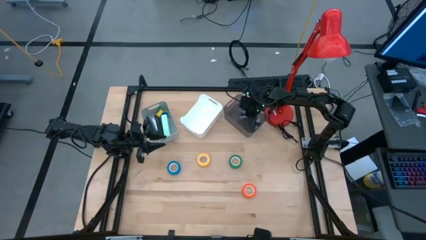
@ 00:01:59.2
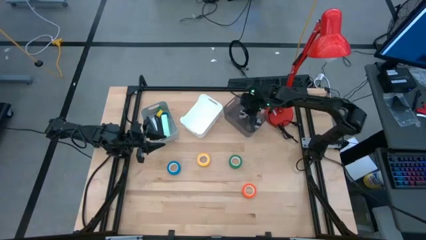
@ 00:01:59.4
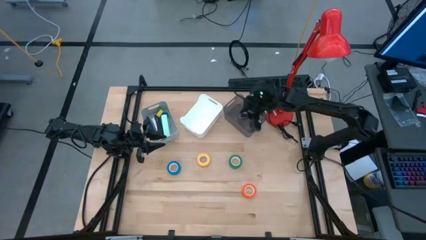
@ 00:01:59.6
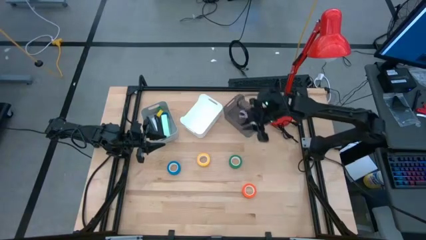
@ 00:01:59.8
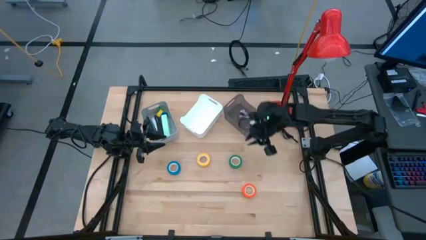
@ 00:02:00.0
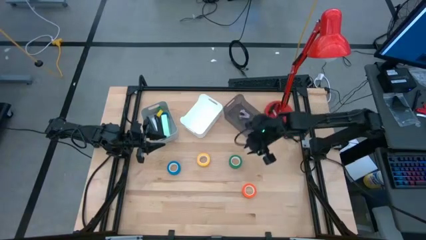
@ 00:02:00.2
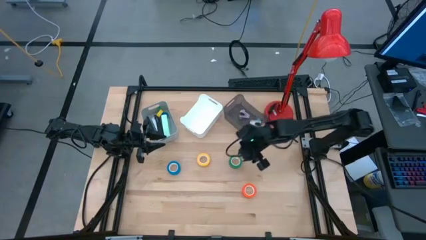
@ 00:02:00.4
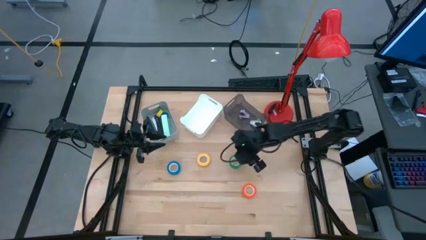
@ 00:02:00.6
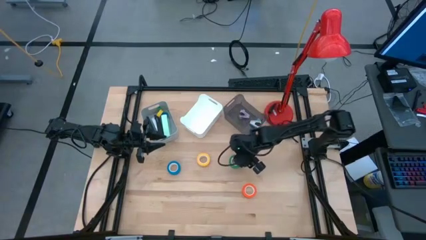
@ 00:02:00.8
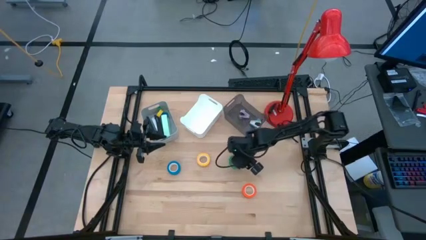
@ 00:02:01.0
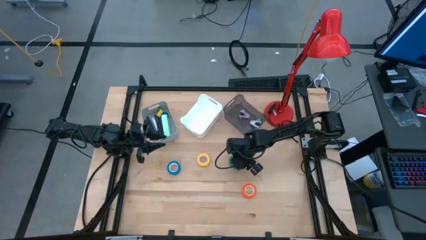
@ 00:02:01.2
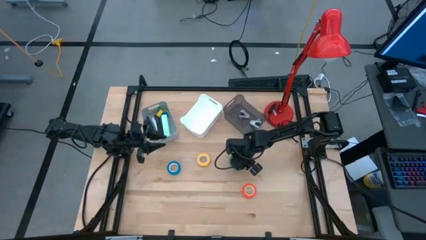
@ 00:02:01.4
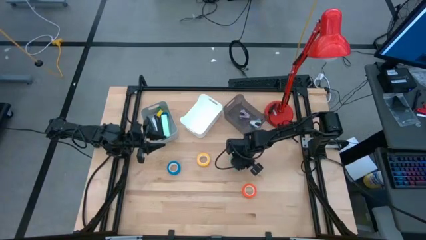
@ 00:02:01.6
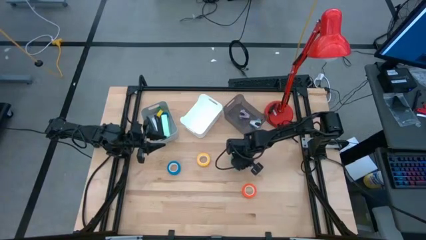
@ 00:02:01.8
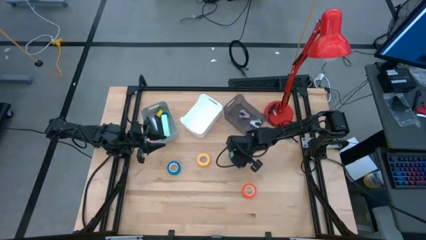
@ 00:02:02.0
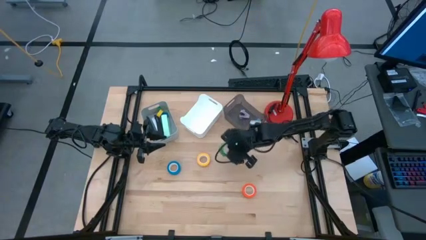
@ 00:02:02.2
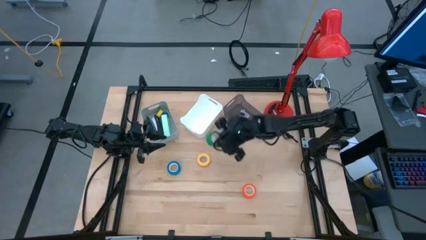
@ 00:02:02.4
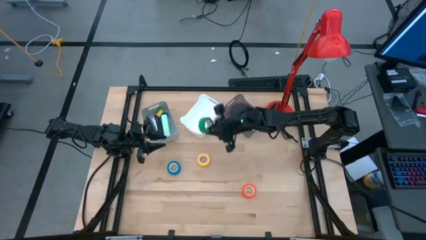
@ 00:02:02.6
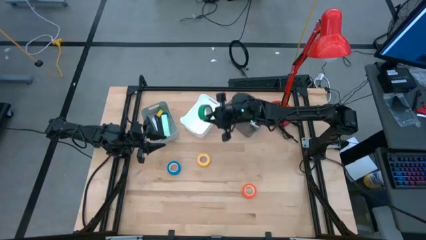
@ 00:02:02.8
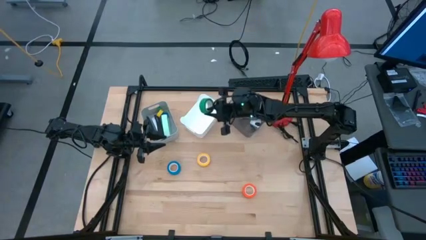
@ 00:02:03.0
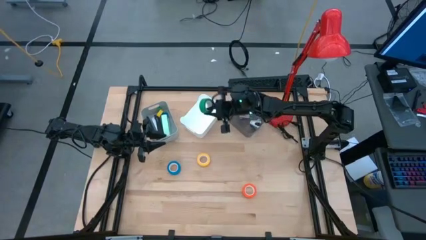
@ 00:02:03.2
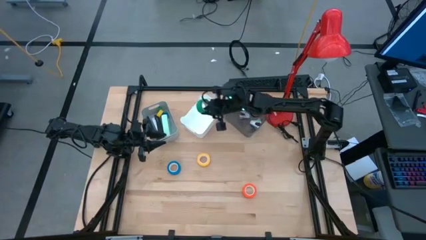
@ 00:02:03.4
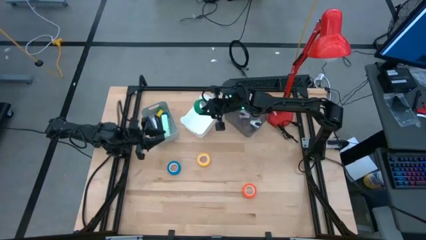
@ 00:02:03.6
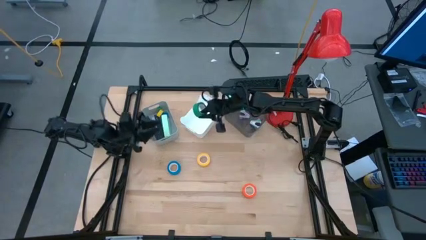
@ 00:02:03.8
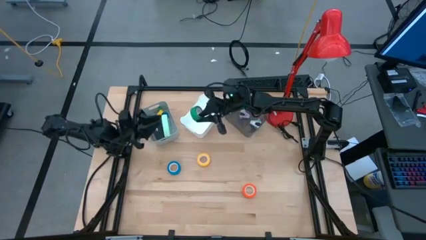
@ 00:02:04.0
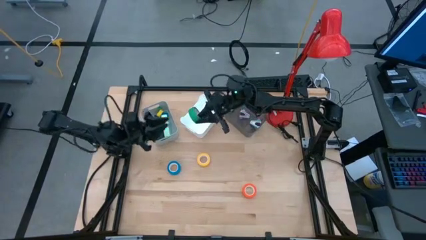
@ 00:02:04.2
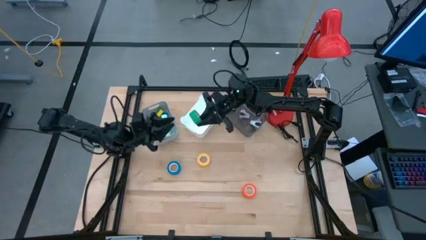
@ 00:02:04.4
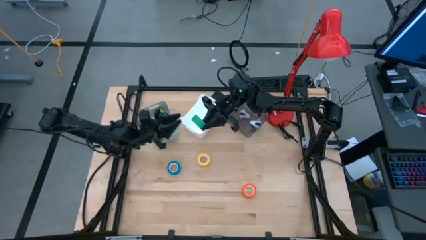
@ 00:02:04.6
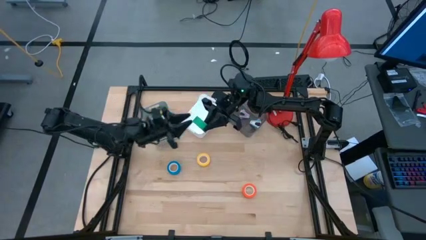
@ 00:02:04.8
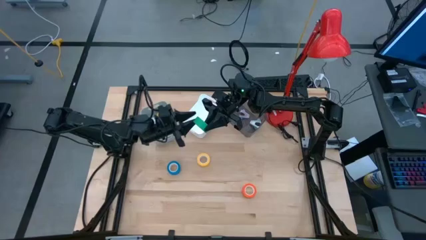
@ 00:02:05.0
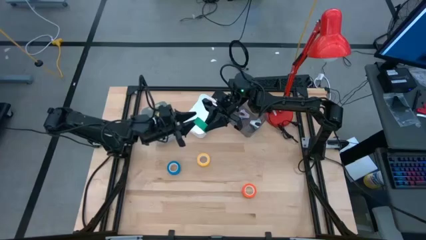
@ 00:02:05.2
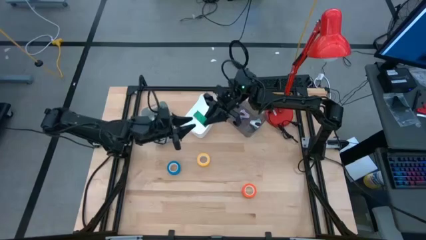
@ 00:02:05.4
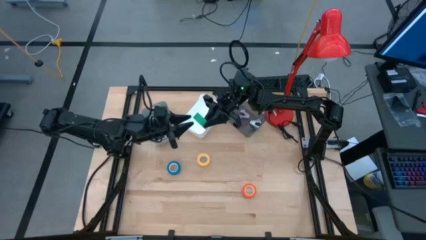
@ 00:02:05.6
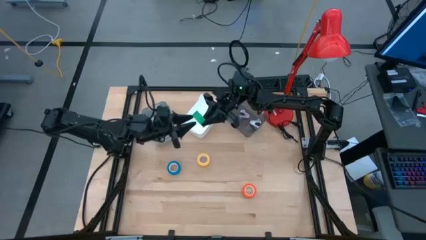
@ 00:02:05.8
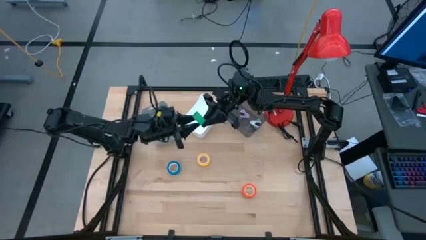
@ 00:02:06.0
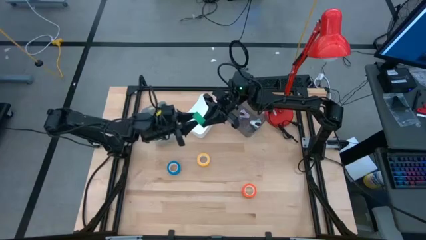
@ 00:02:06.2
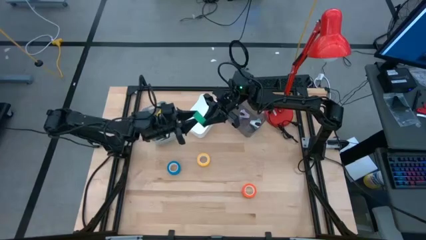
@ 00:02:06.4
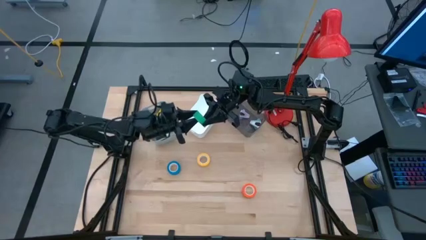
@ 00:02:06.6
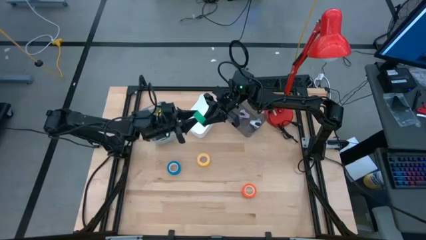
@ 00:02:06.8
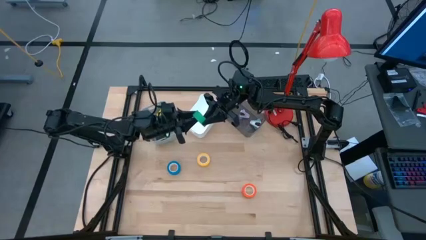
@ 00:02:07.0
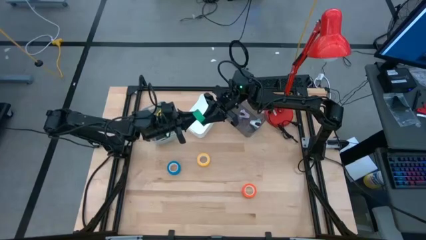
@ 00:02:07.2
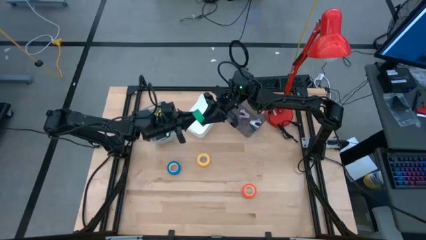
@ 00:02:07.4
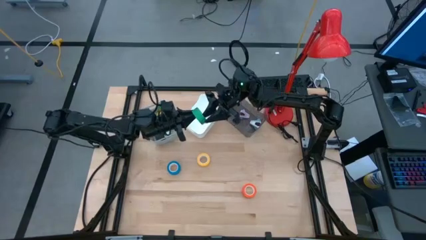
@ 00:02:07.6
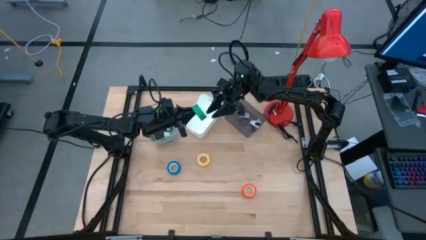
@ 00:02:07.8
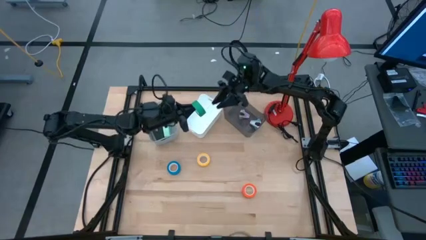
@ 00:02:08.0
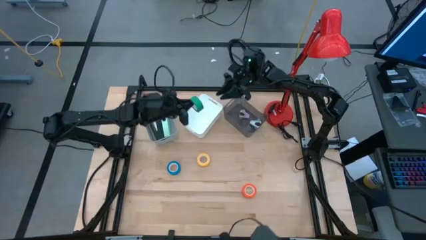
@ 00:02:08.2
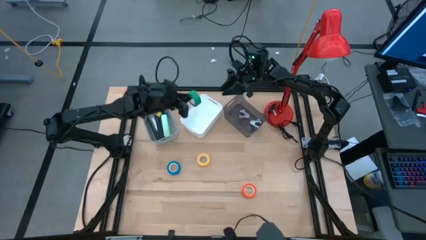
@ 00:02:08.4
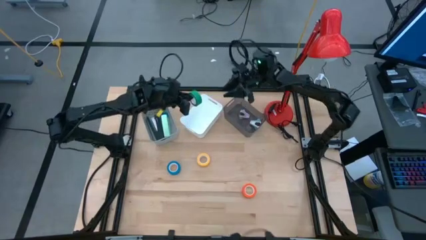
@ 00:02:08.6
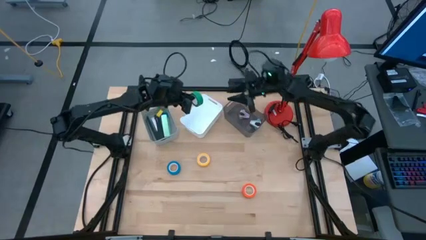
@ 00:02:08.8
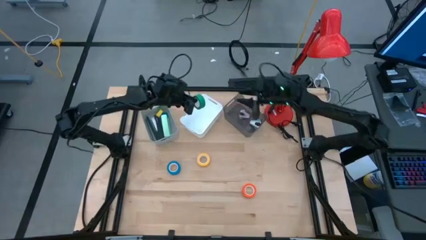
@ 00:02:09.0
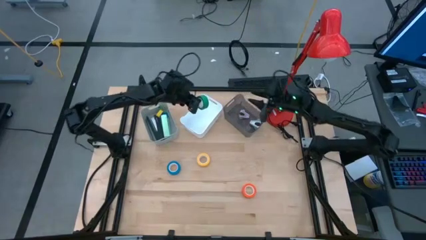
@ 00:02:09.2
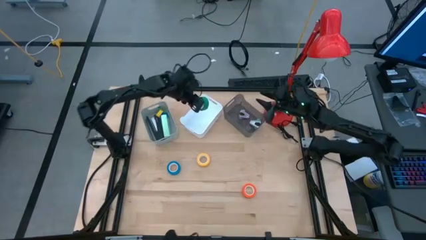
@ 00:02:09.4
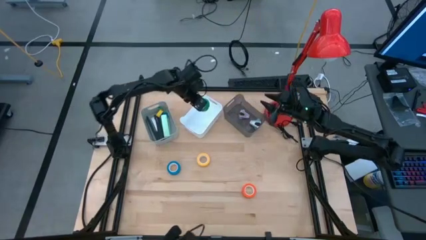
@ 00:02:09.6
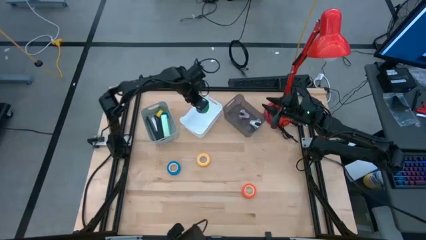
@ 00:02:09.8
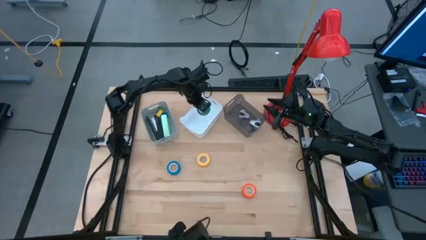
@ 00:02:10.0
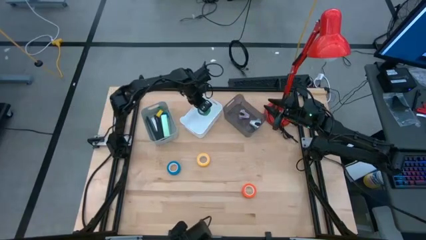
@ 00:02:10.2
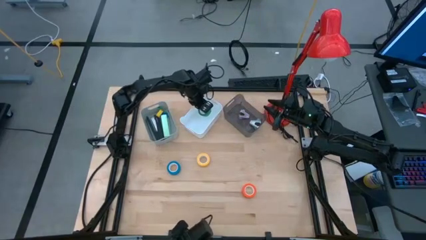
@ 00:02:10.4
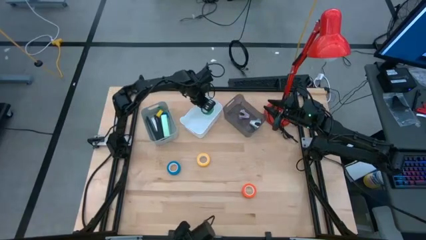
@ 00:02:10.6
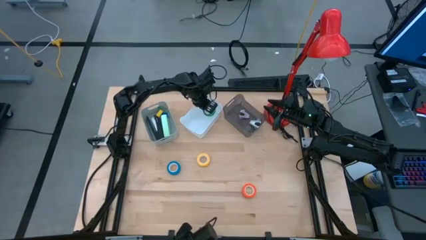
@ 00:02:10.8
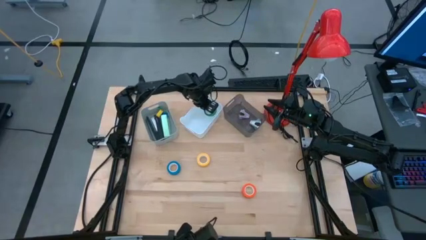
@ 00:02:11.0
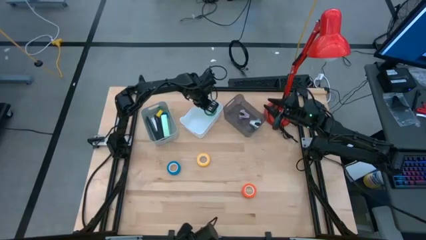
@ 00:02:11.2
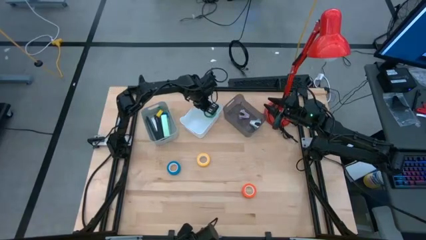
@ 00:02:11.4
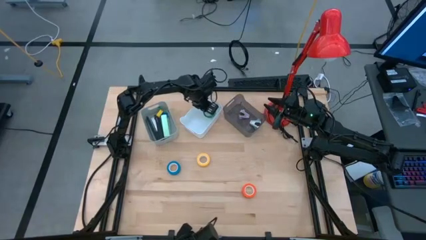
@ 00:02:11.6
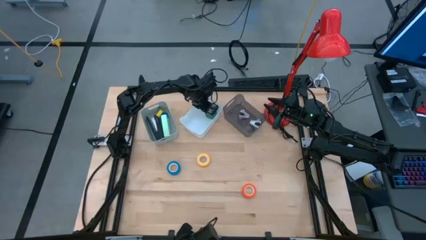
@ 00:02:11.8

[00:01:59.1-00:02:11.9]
Task: Pick and place Stapler, Stapler remover, tape
Put the green tape into the white bin

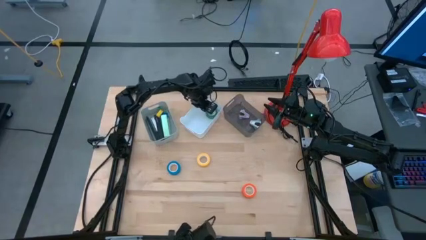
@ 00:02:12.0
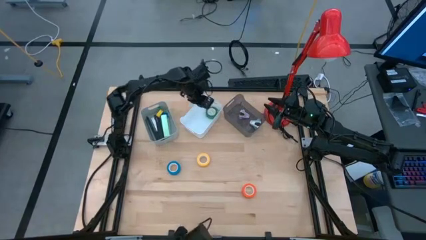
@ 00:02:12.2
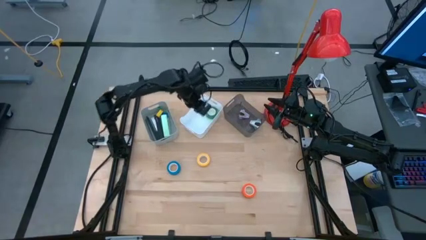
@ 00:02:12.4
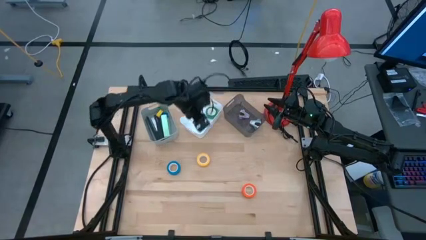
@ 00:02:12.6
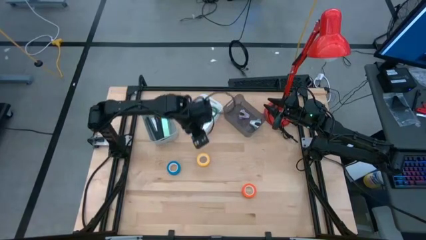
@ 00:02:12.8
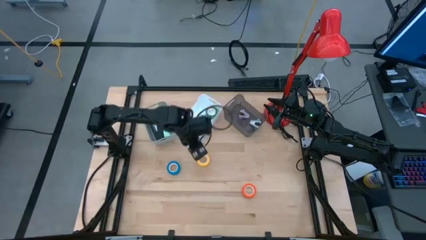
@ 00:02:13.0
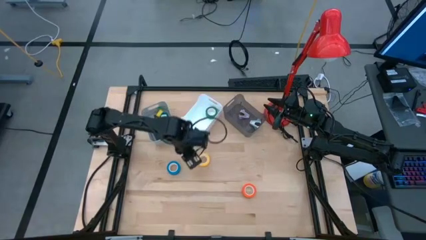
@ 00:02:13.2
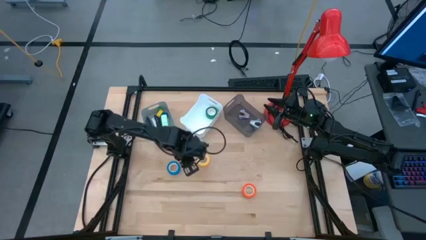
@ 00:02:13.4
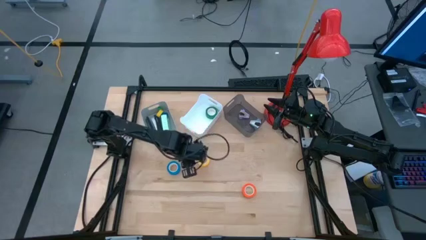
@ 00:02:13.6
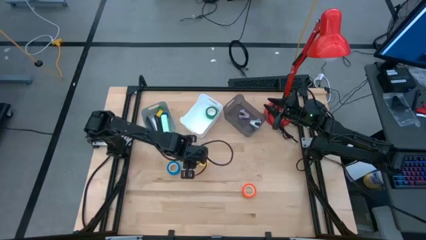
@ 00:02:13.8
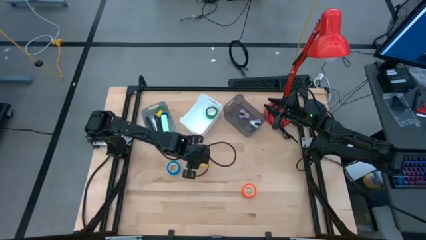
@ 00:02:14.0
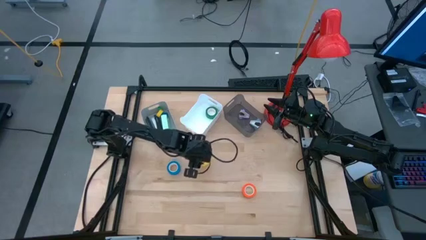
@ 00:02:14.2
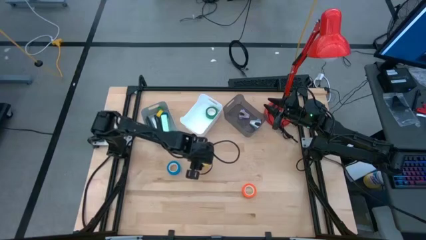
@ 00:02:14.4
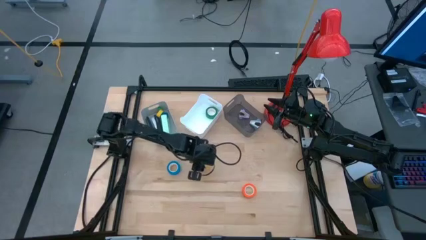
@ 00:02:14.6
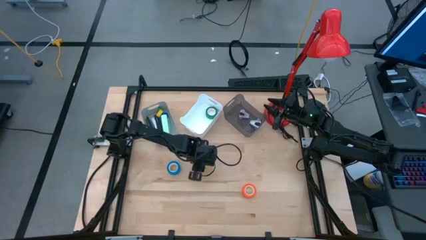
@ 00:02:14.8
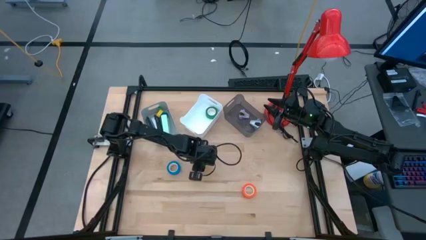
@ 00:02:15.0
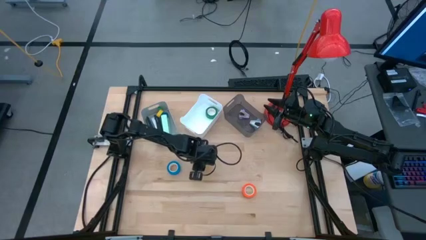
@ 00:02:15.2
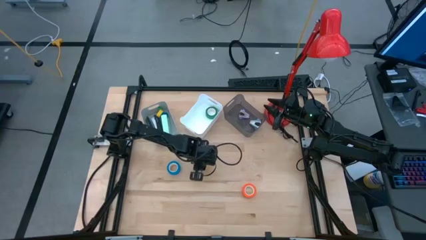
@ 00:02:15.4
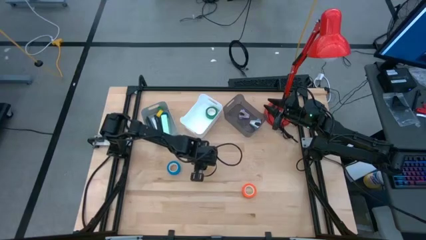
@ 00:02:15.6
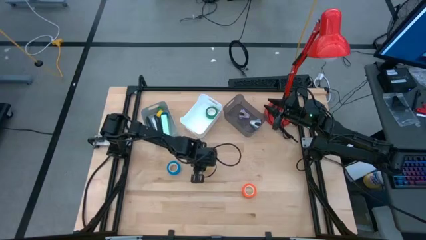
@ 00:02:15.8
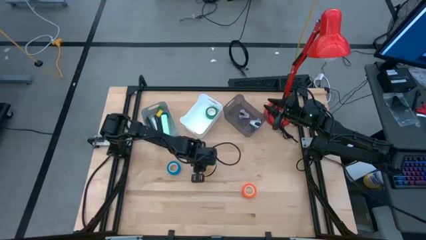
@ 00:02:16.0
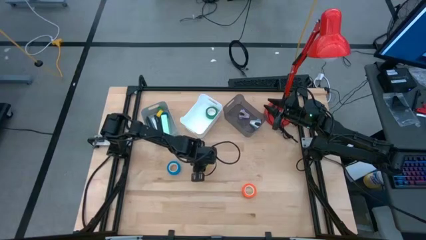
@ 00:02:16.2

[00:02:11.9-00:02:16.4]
Put the yellow tape into the white bin
